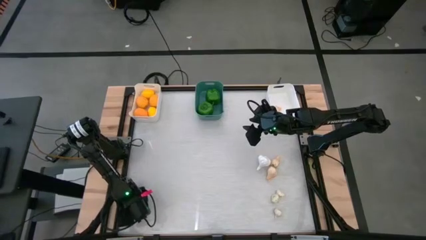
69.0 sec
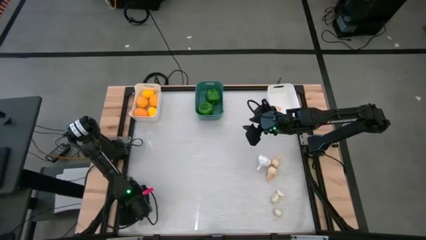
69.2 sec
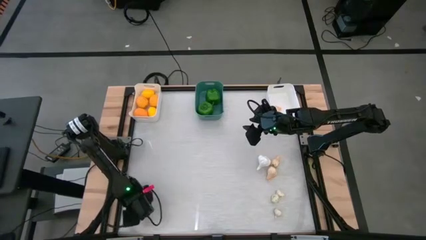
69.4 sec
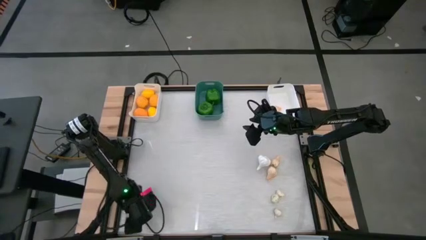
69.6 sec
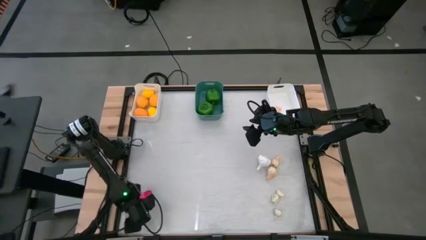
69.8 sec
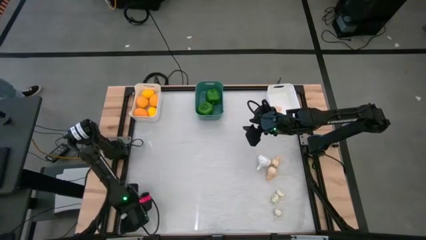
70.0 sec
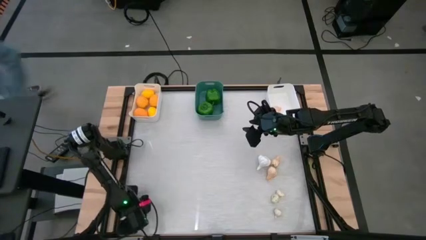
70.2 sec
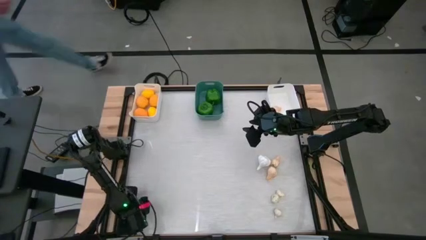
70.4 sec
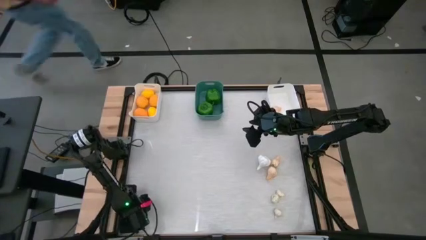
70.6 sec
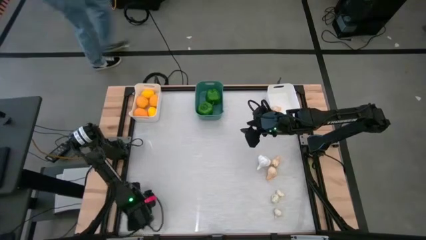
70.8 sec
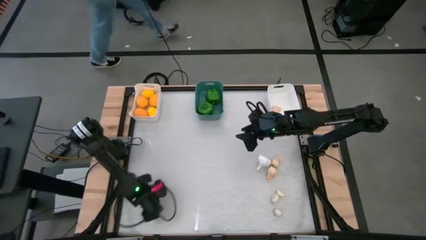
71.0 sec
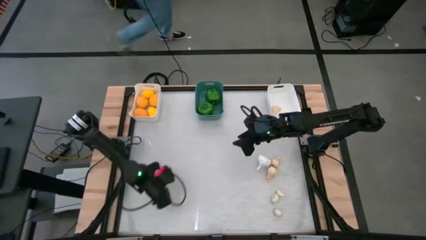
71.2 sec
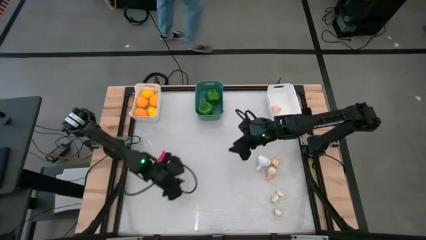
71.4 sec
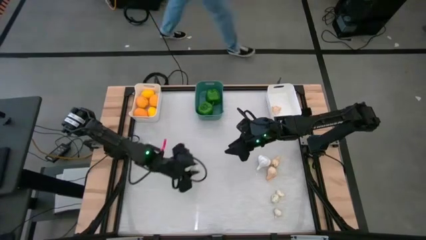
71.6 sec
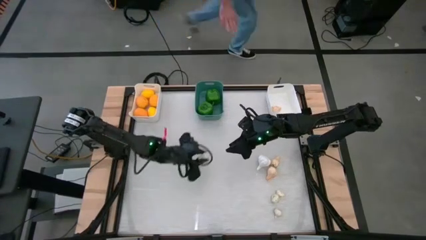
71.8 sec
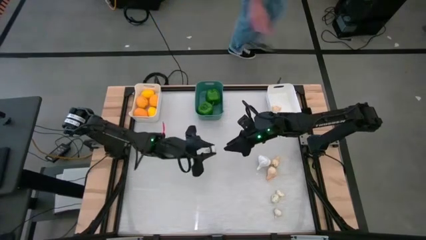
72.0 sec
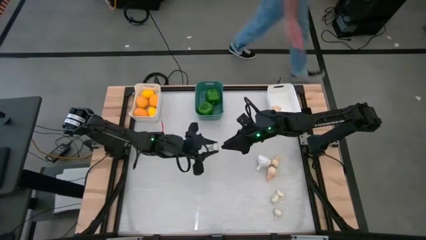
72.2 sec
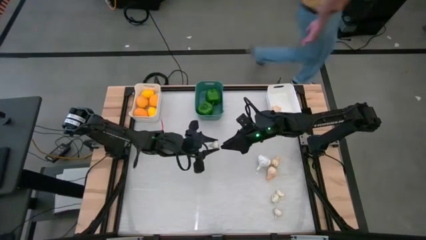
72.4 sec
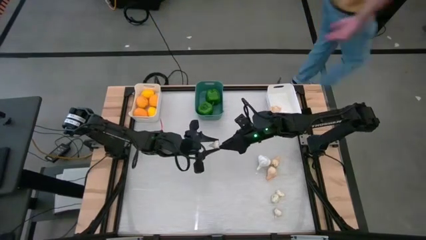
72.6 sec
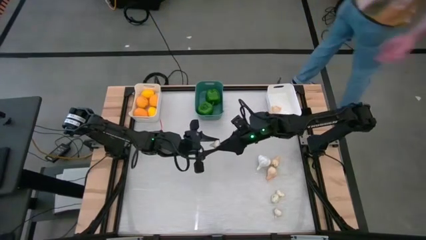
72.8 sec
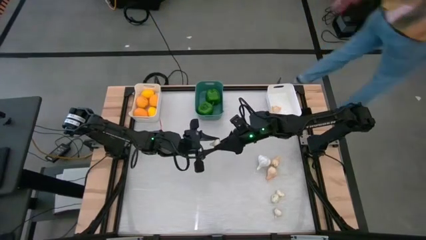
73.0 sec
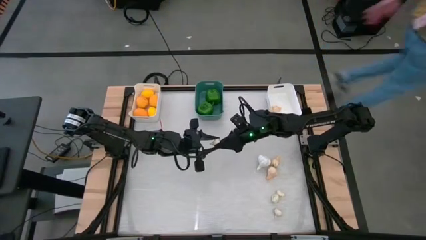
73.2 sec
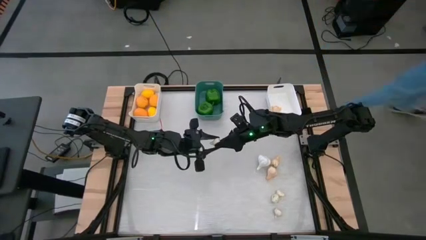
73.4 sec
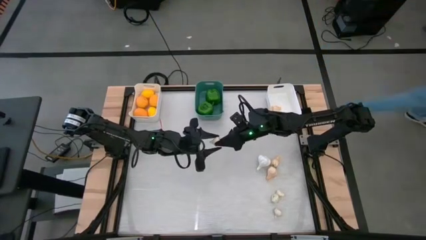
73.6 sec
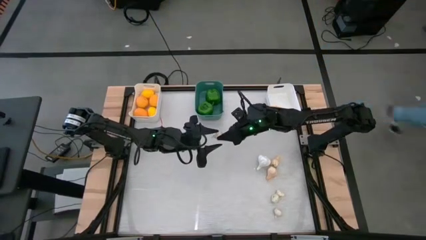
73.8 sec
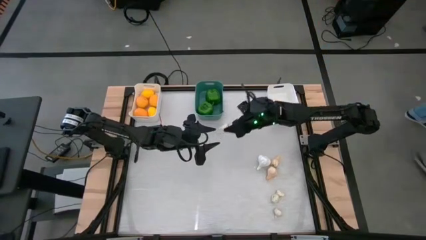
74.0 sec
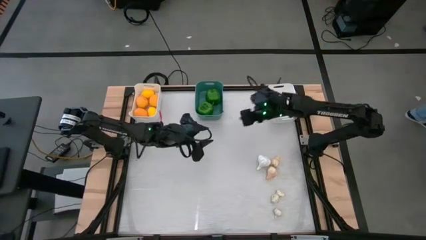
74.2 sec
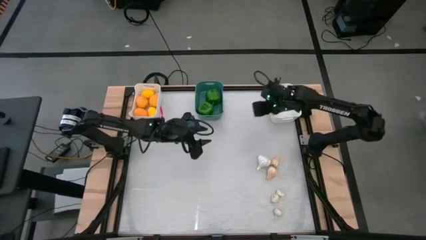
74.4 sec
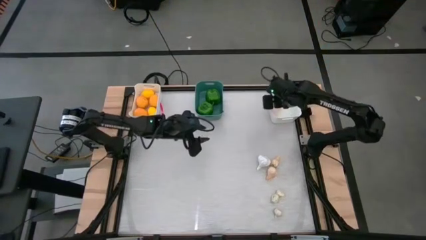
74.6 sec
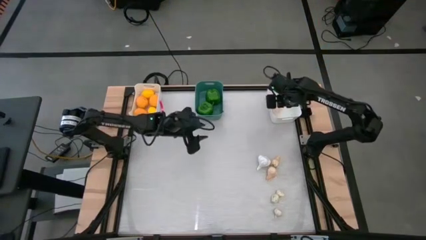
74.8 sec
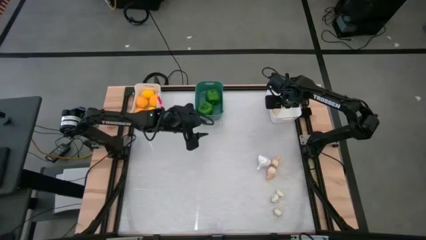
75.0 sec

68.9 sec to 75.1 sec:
Task: Sort produce into baskets
Put the bottom left white garlic into the right white bin

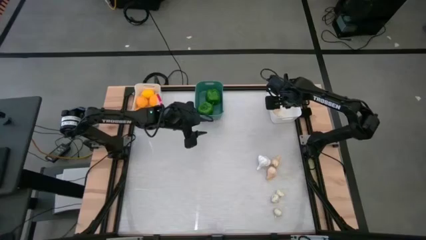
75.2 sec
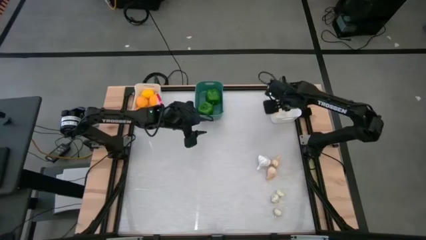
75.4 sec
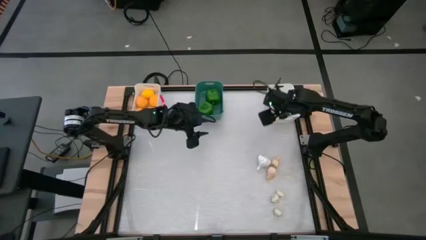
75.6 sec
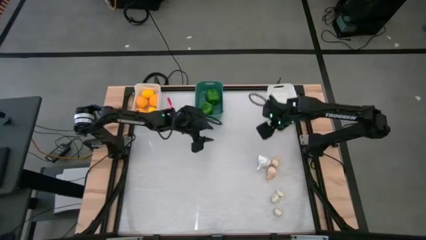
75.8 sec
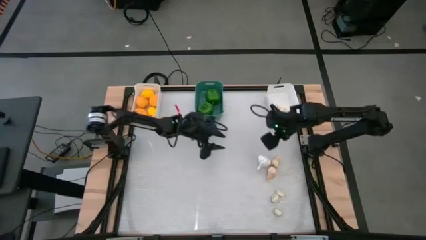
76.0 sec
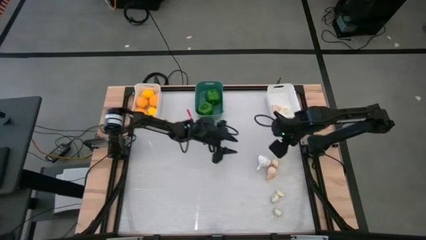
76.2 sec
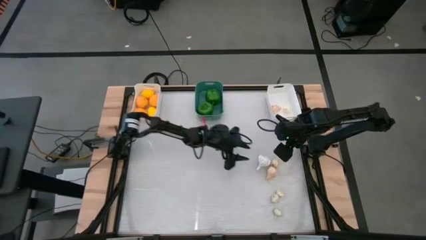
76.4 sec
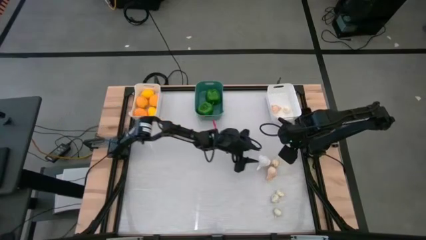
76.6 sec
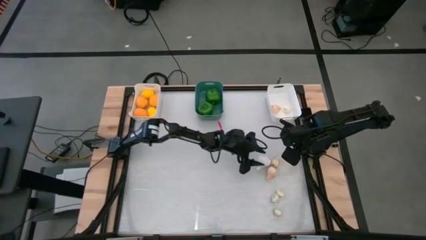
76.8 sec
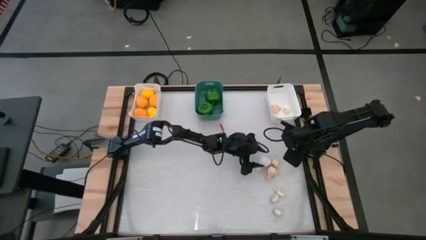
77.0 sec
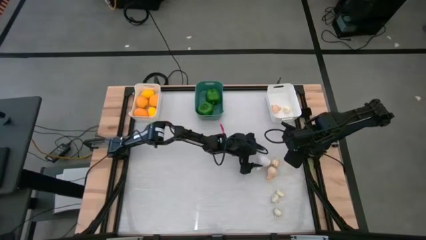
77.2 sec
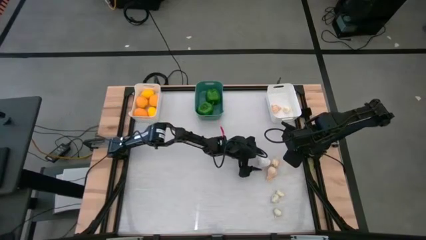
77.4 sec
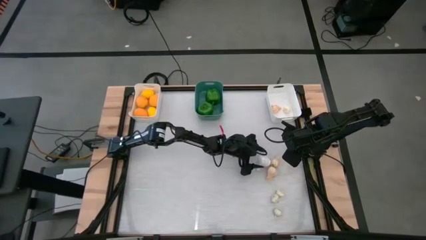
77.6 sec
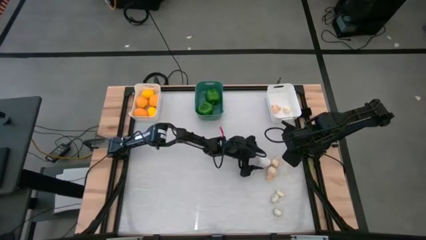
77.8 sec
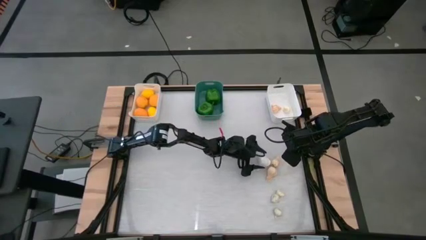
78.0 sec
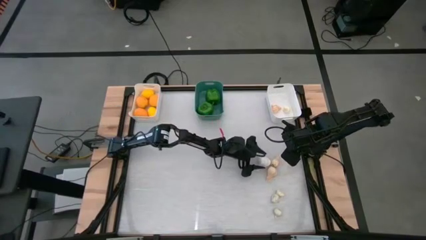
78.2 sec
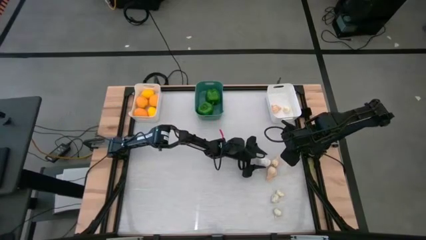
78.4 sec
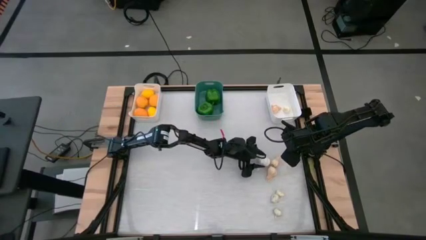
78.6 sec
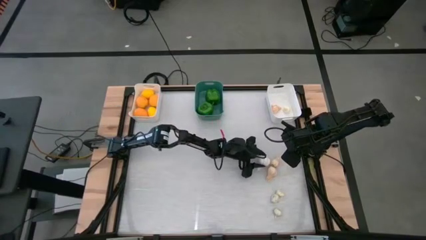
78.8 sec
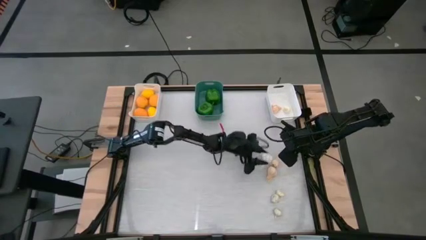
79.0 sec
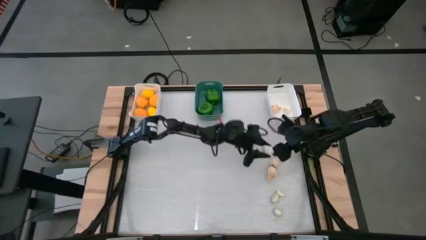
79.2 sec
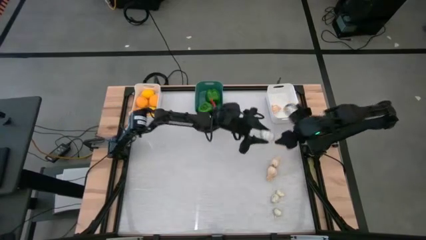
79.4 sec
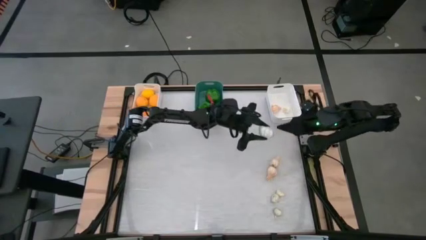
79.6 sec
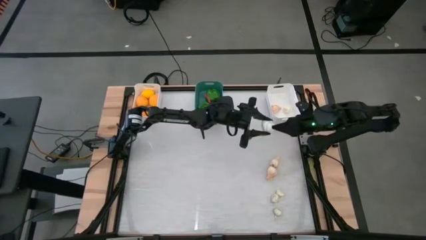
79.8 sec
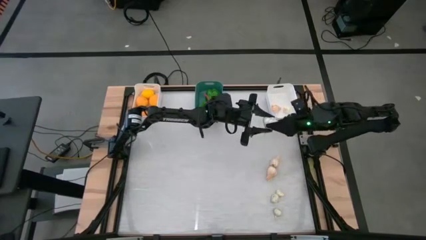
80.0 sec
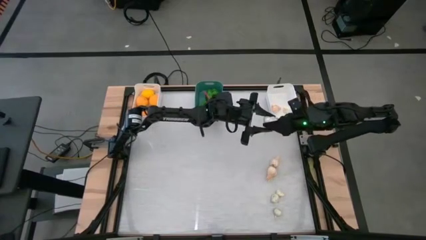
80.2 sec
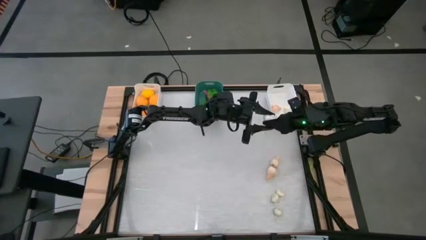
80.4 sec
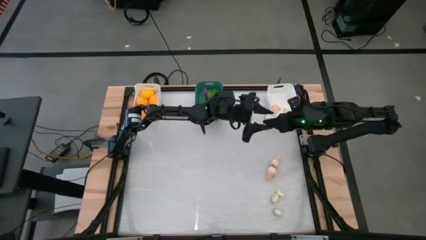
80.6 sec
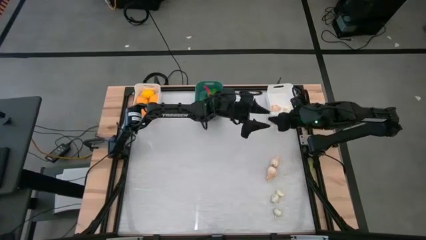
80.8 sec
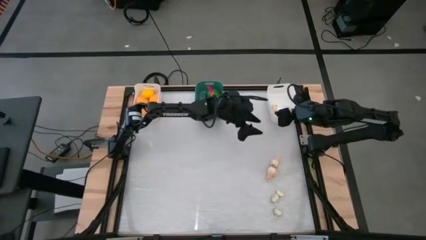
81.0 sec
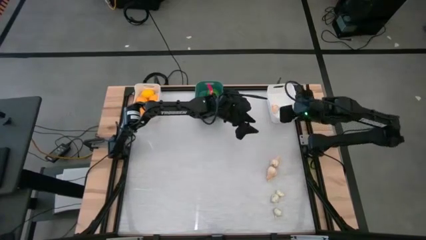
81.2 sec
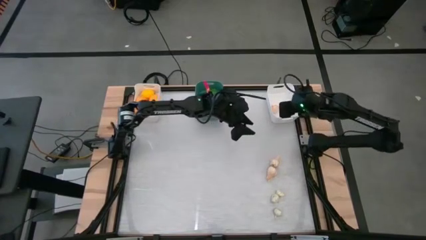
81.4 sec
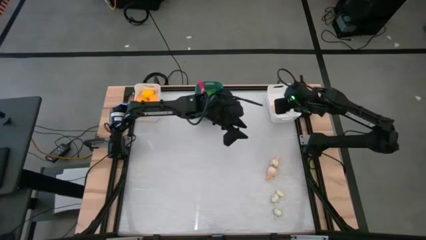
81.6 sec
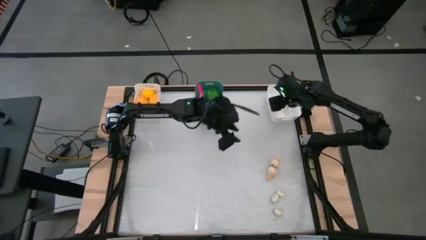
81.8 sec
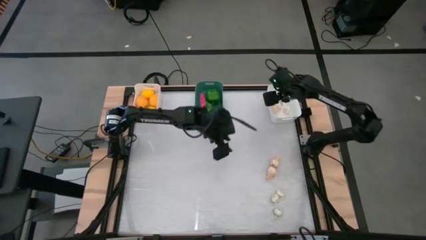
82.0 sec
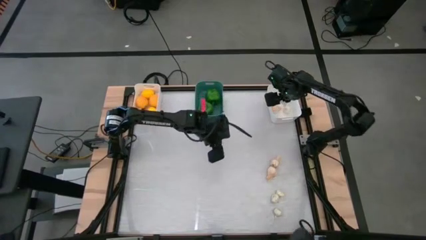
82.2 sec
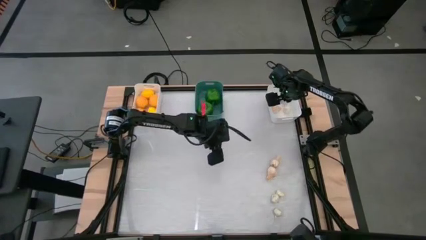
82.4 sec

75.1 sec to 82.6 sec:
Put the top left white garlic into the right white bin

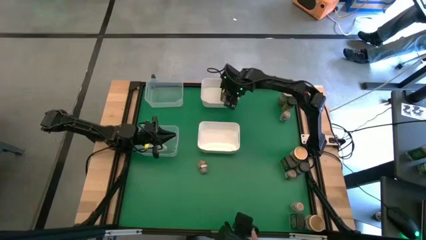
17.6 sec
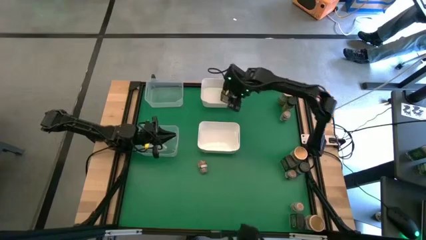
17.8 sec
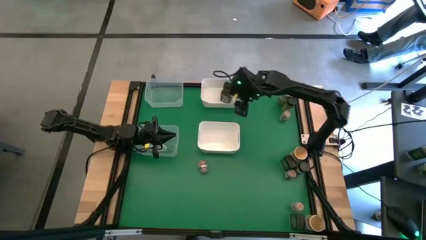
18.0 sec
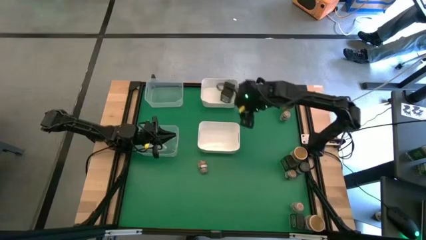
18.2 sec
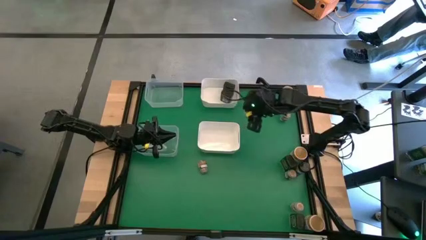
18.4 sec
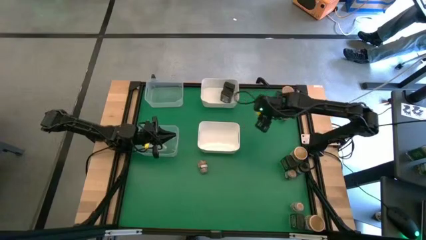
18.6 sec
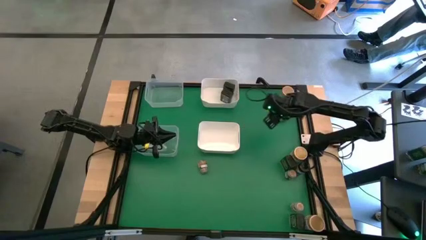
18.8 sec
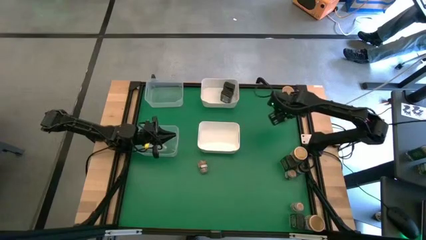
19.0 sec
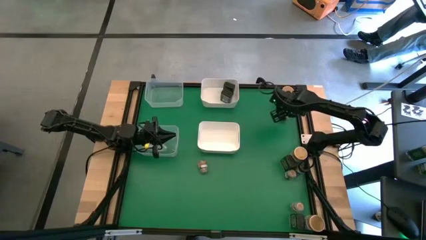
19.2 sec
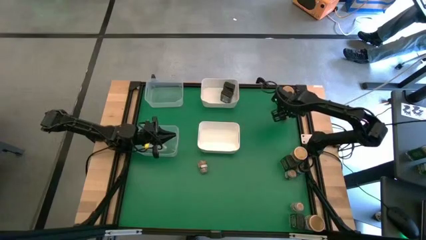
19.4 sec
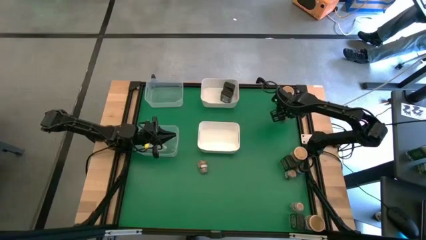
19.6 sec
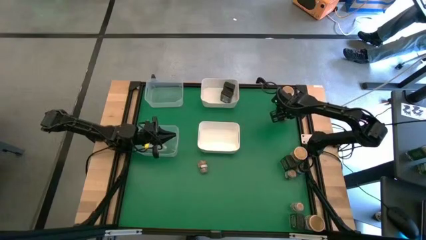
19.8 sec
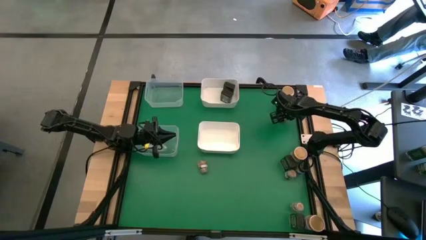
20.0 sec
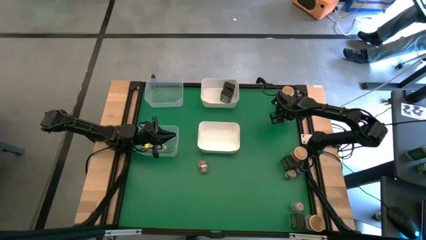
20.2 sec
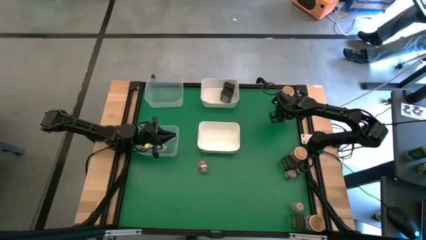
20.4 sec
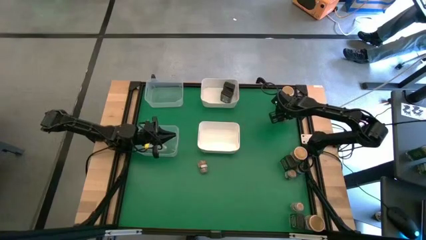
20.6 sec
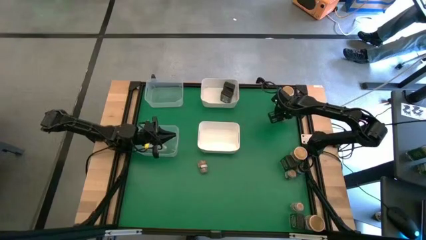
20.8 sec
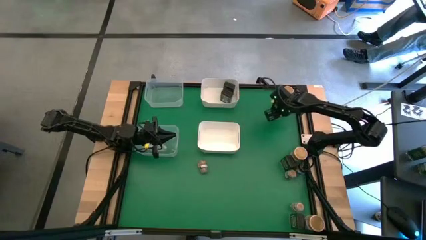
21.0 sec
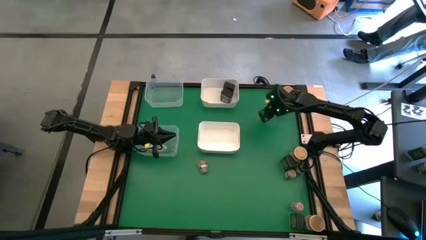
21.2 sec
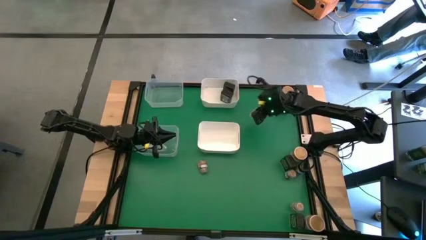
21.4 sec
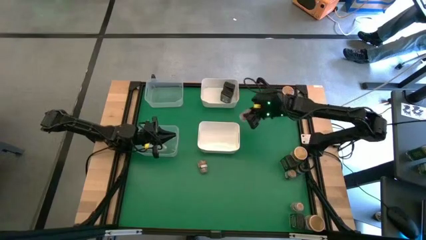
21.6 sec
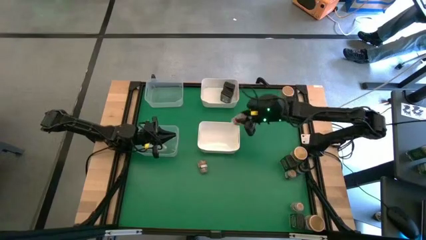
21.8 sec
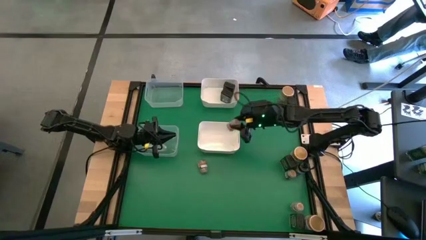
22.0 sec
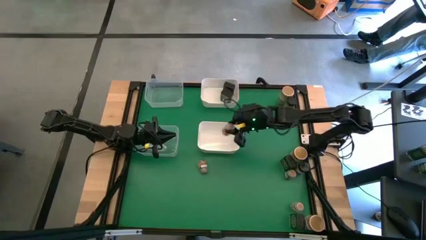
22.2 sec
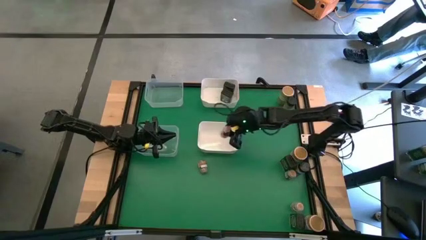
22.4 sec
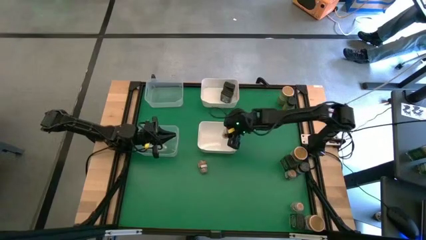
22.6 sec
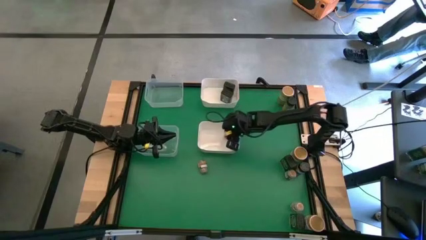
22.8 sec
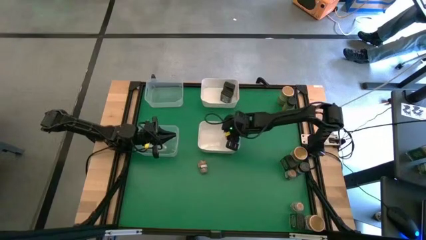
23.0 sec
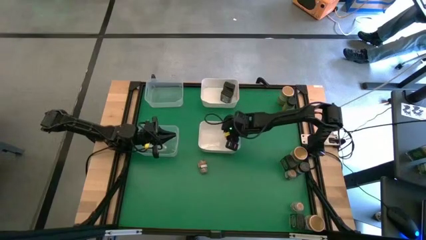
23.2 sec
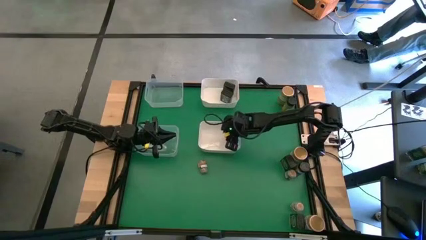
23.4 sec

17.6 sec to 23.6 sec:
Task: Sort spices by type
Put the top brown seasoning bottle into the bottom white bin
